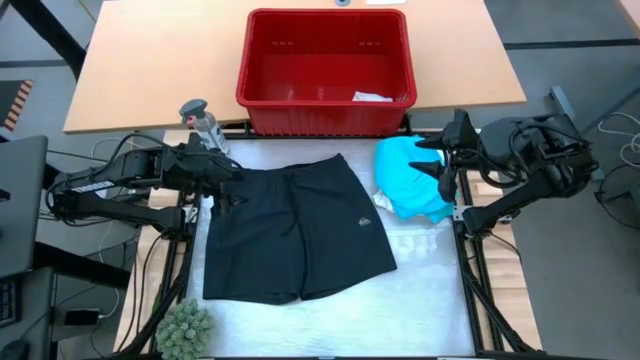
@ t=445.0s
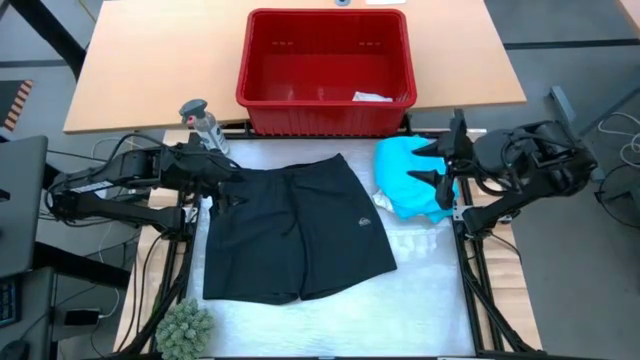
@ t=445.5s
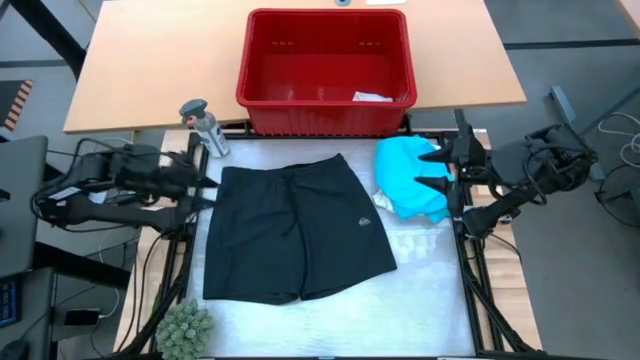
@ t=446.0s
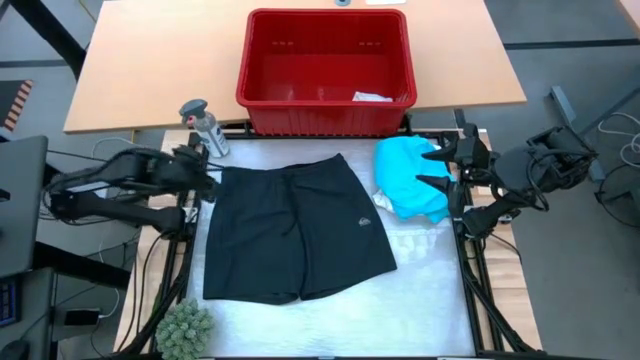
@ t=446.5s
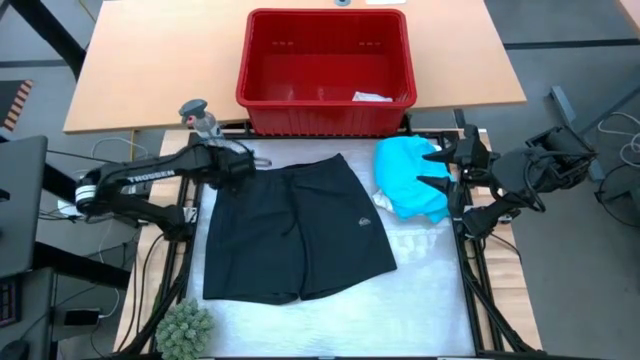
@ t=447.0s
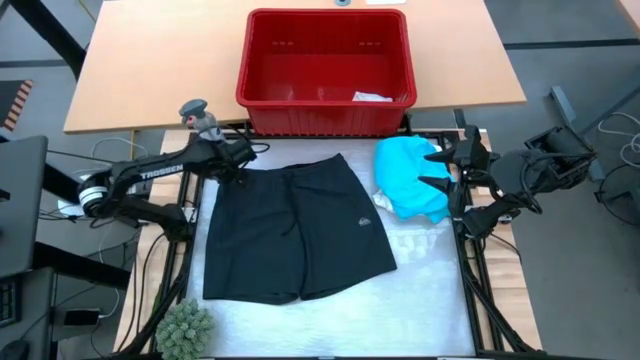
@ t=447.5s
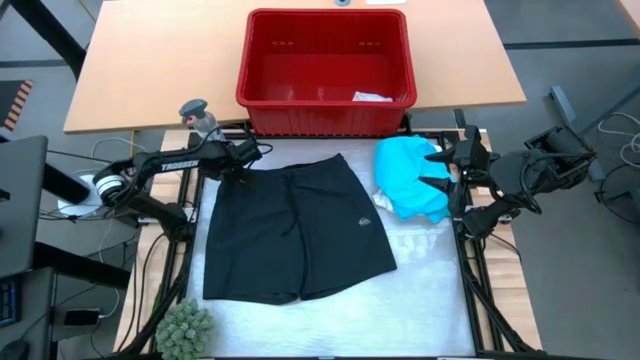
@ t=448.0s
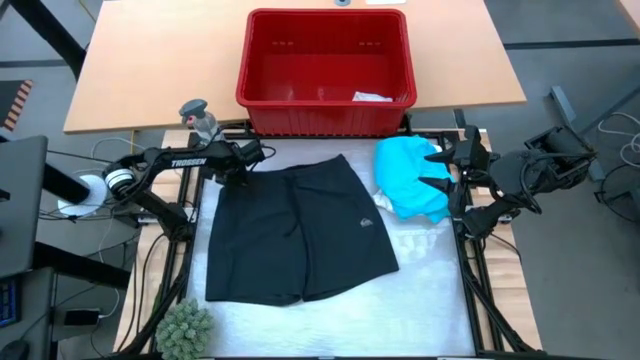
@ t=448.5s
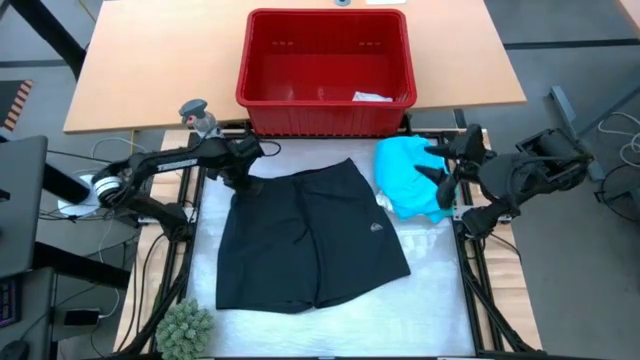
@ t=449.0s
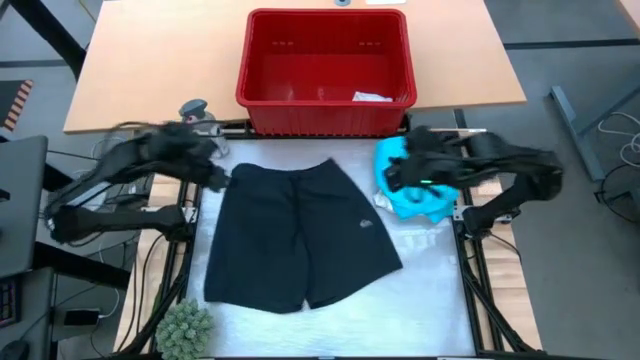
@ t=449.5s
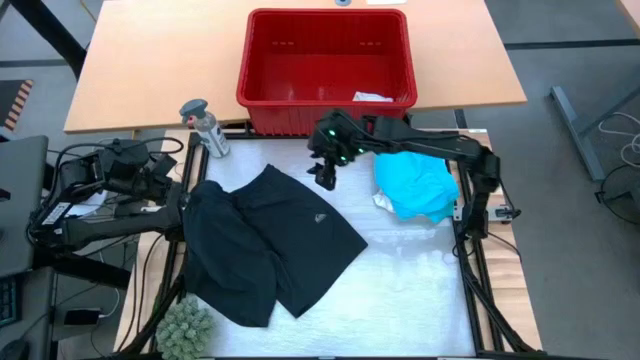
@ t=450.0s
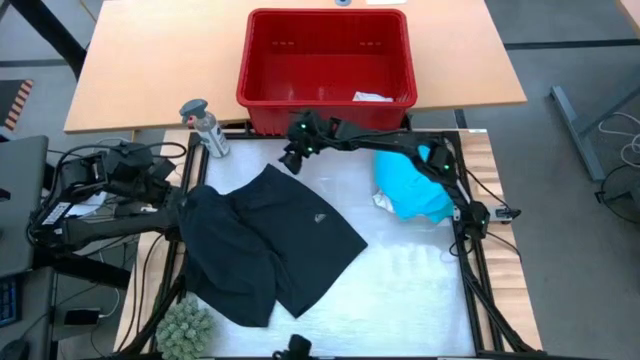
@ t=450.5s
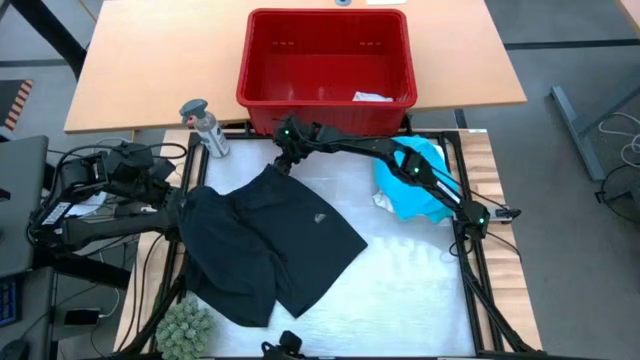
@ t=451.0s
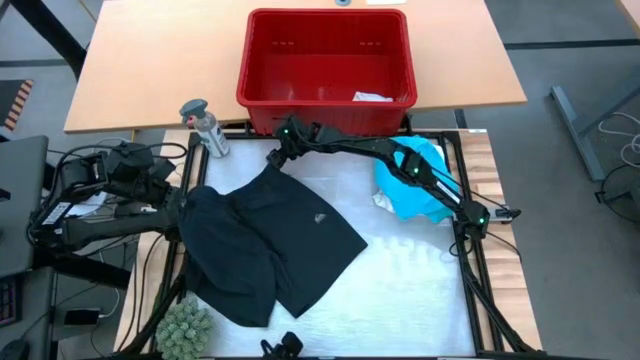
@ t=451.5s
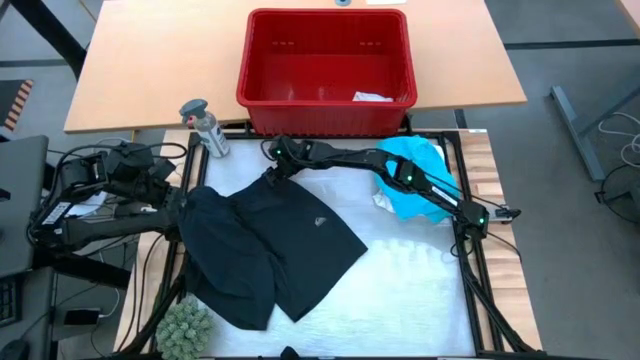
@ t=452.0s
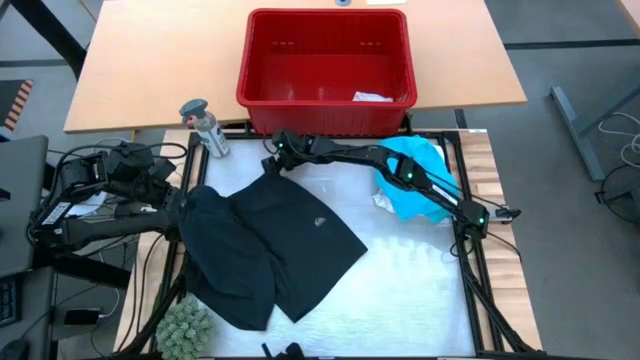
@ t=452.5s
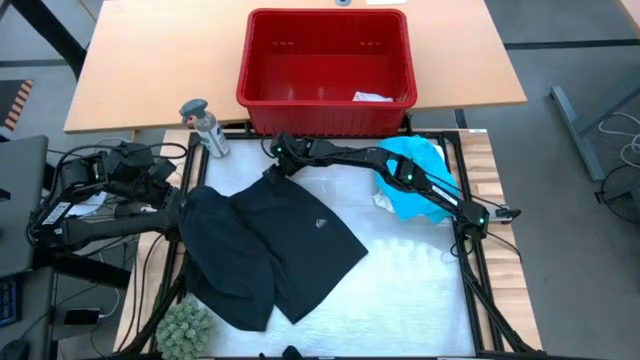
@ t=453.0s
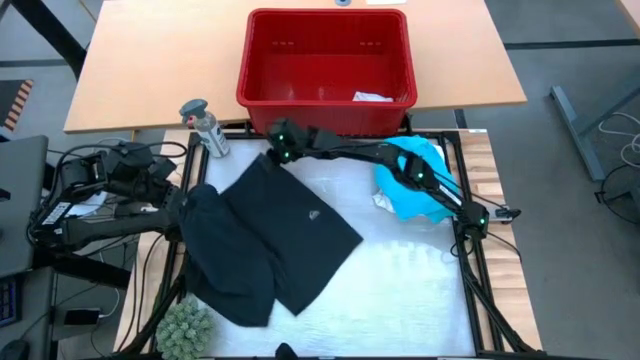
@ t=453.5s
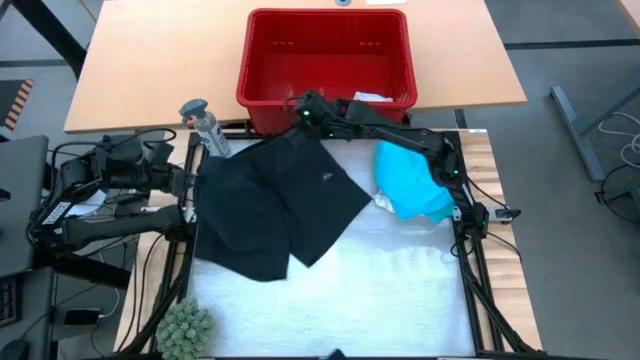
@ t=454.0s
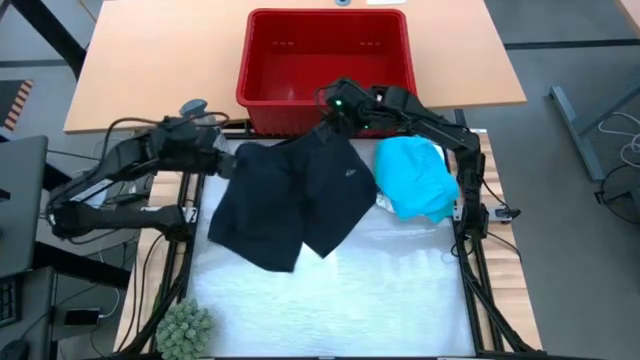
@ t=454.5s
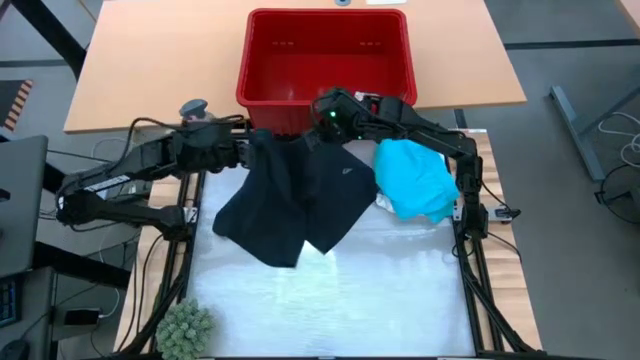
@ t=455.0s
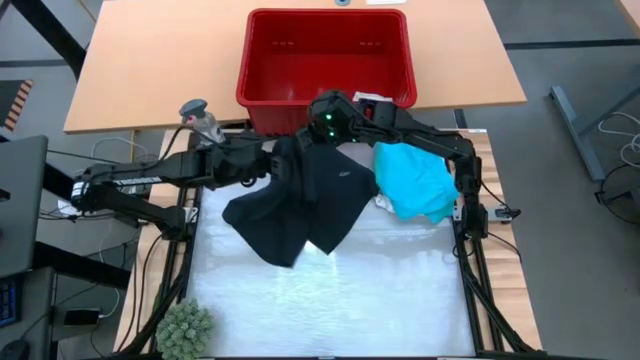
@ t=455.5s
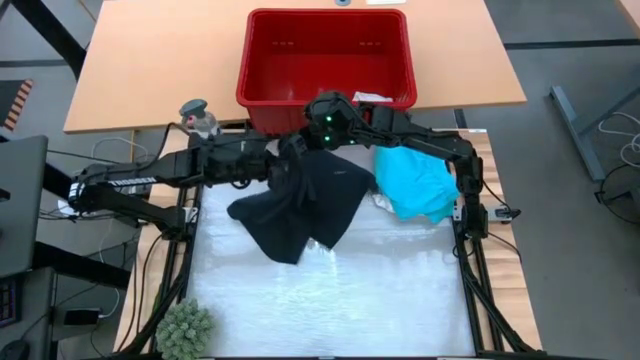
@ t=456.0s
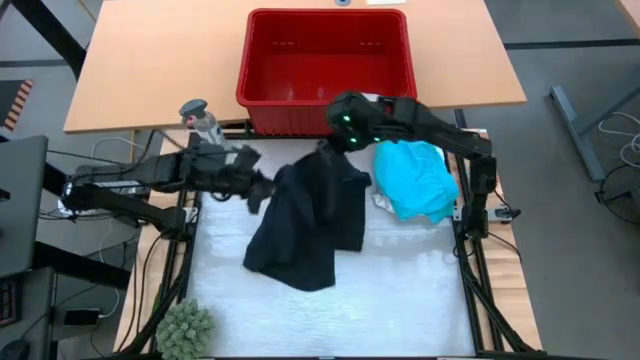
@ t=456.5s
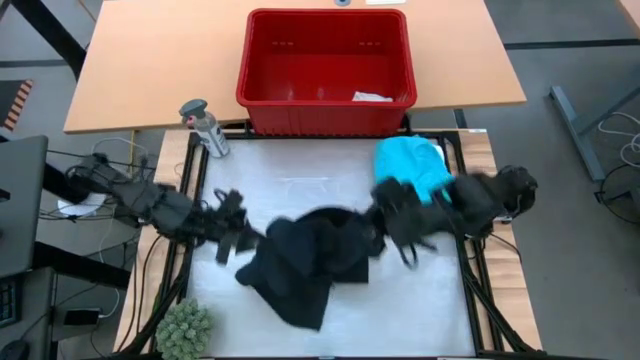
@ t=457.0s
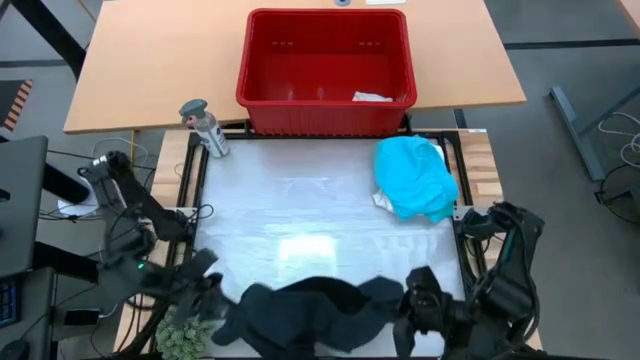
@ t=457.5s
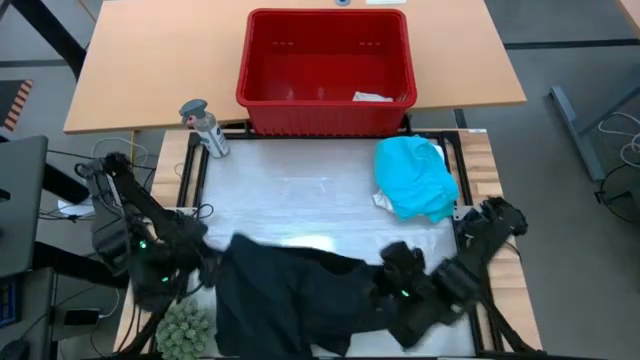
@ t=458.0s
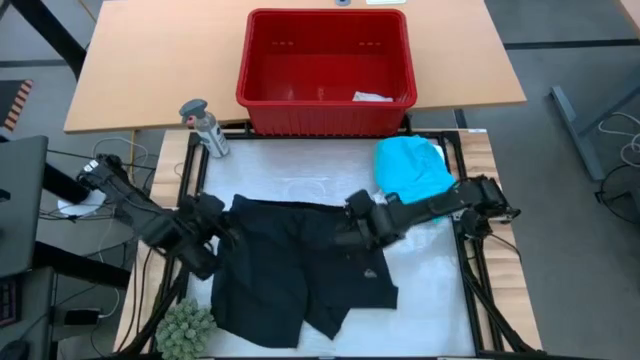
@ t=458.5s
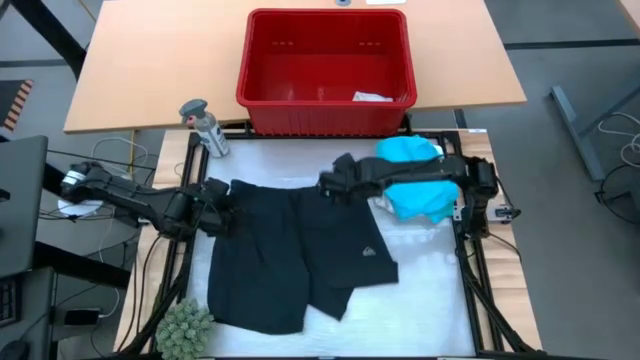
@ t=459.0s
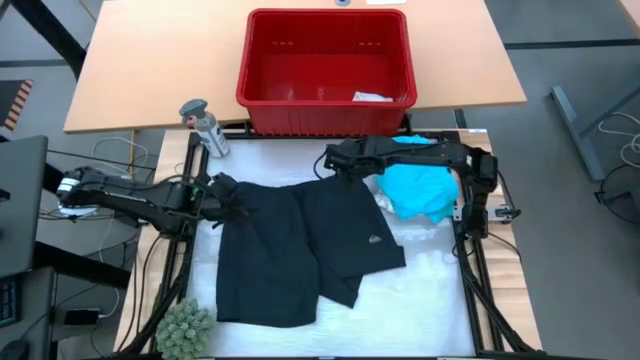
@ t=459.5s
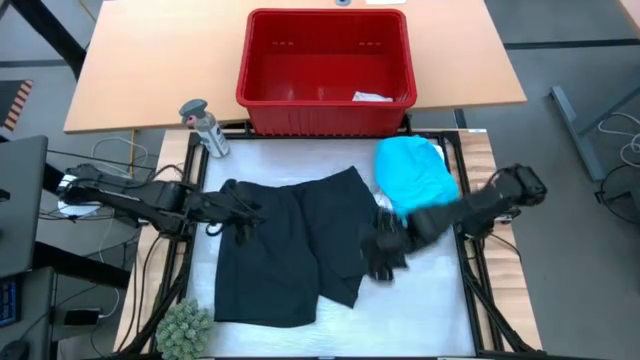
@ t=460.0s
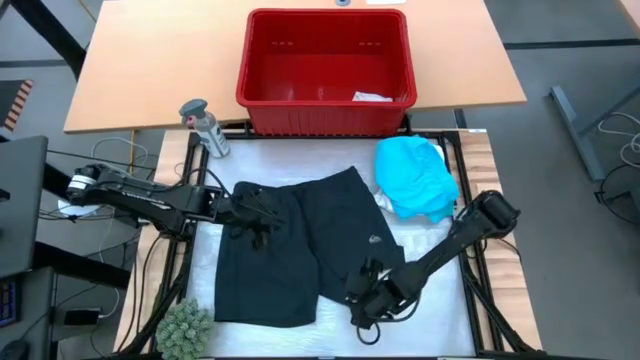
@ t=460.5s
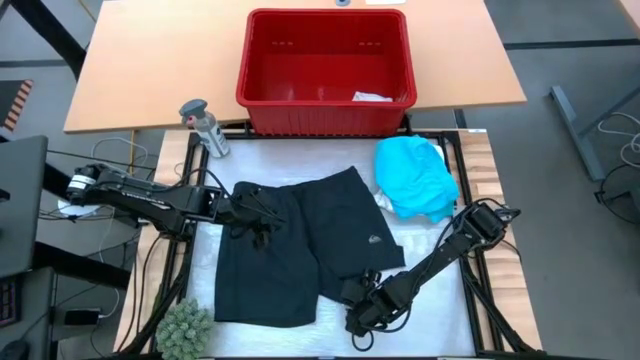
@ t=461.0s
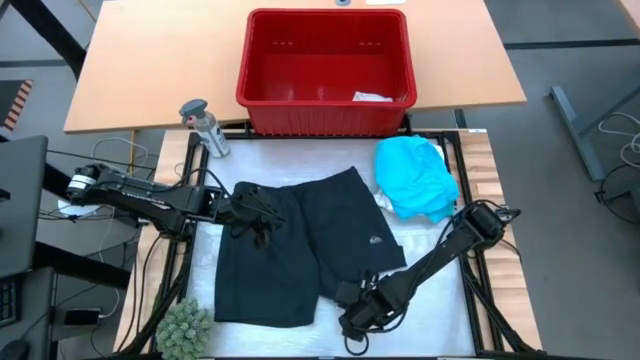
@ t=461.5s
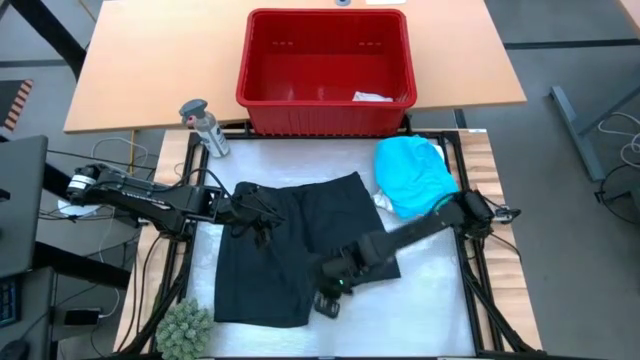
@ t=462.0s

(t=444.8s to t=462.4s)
Task: Fold Laundry from Bin
Fold the black shorts
